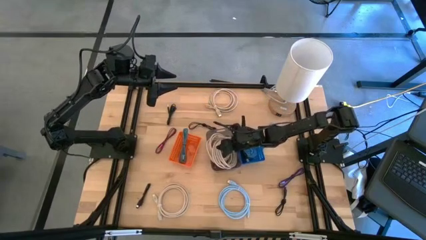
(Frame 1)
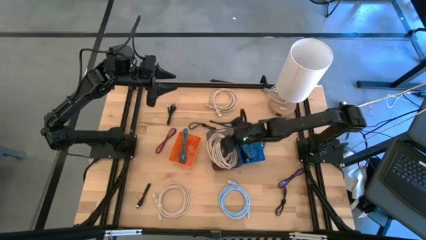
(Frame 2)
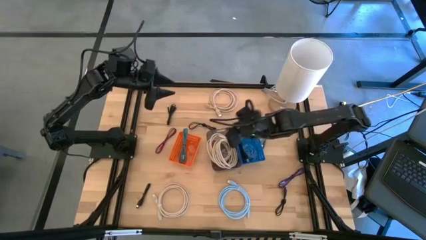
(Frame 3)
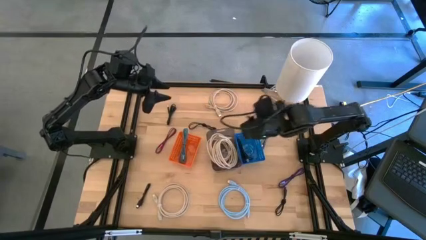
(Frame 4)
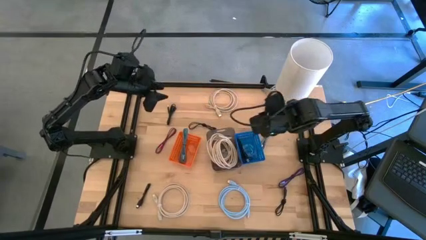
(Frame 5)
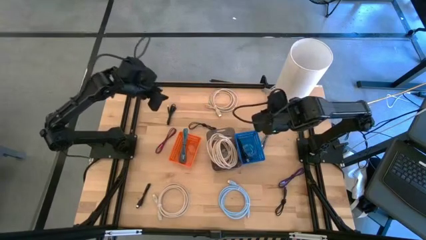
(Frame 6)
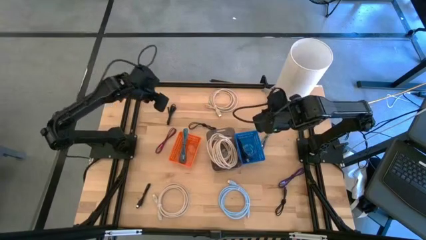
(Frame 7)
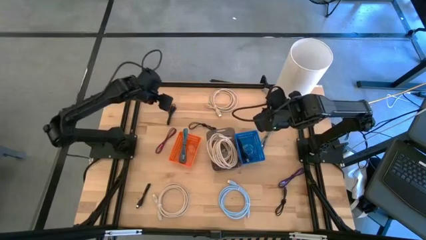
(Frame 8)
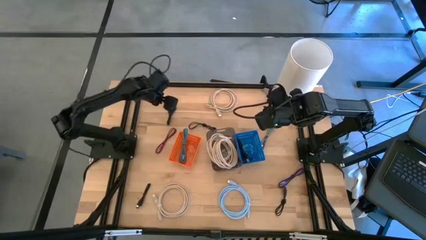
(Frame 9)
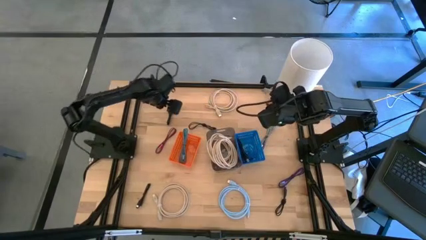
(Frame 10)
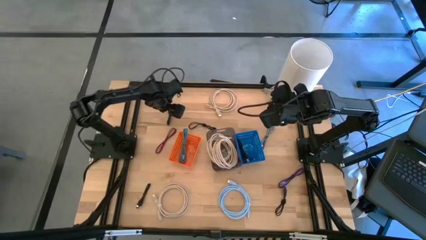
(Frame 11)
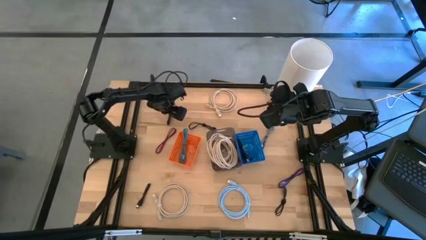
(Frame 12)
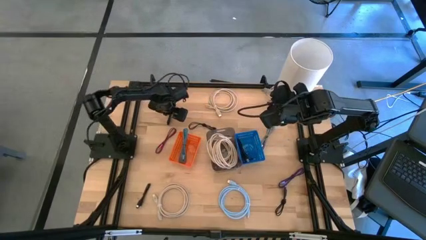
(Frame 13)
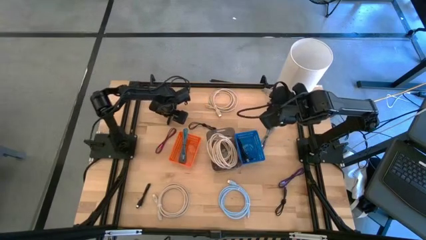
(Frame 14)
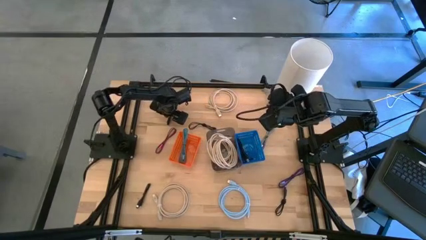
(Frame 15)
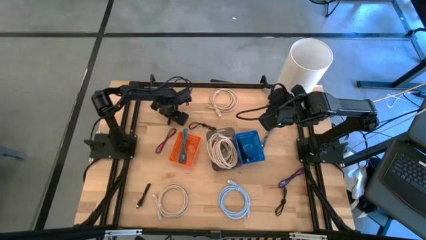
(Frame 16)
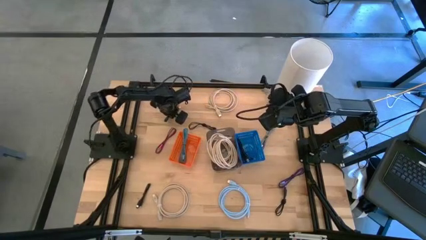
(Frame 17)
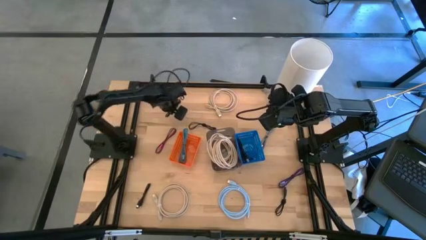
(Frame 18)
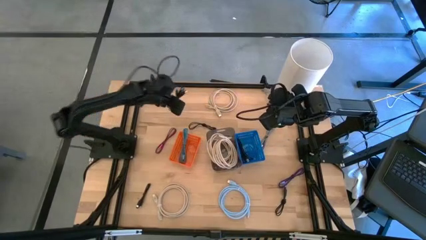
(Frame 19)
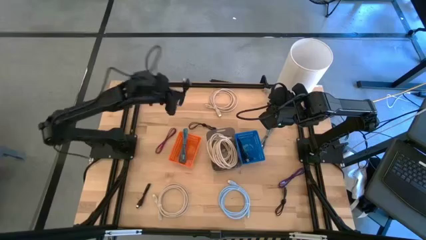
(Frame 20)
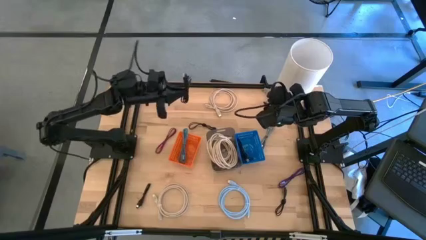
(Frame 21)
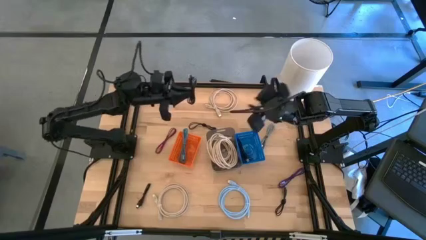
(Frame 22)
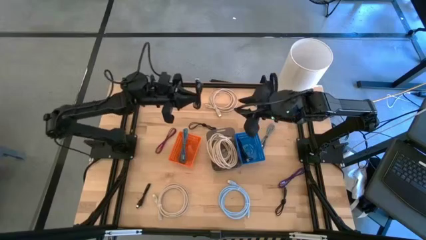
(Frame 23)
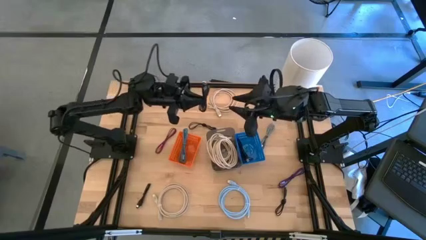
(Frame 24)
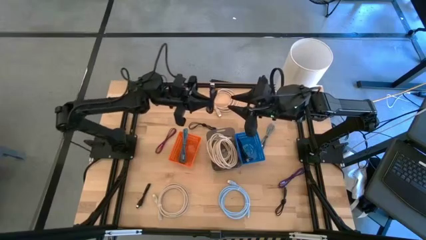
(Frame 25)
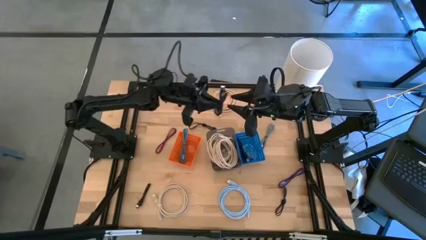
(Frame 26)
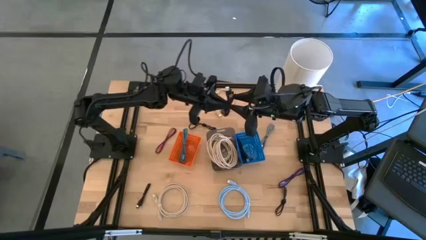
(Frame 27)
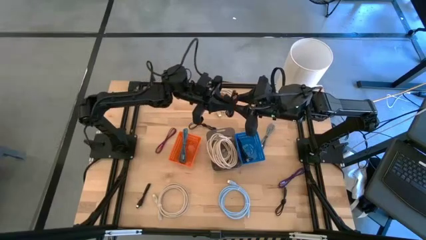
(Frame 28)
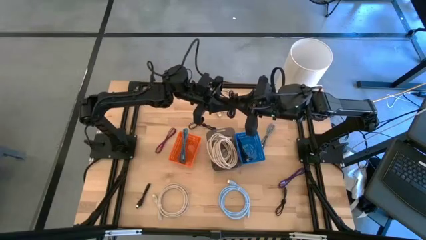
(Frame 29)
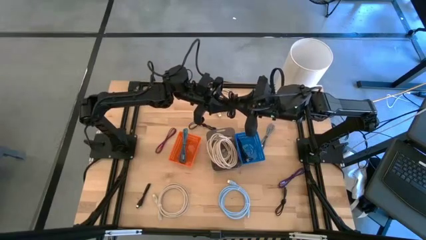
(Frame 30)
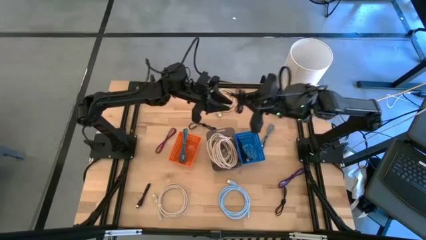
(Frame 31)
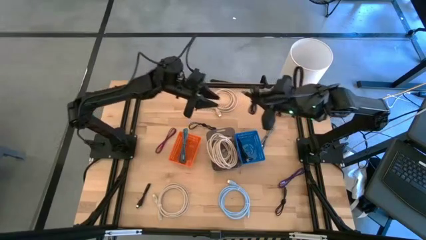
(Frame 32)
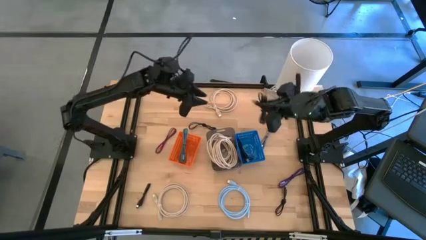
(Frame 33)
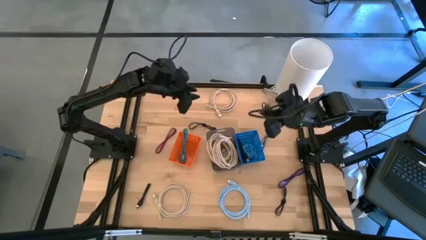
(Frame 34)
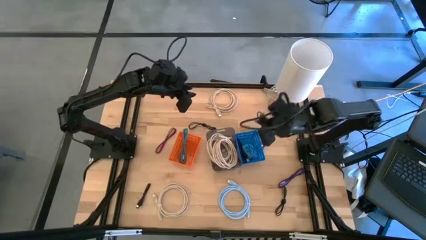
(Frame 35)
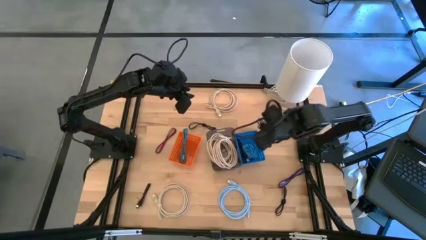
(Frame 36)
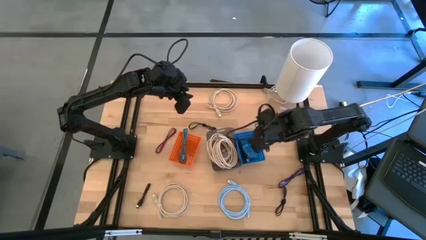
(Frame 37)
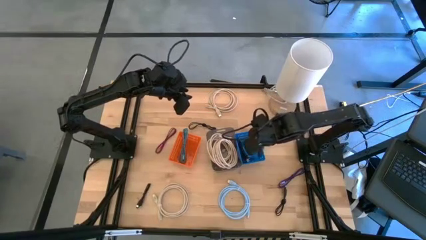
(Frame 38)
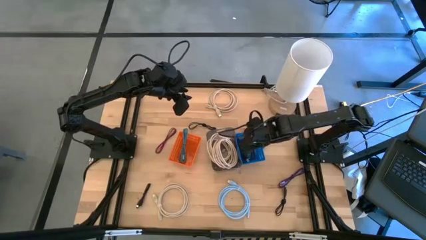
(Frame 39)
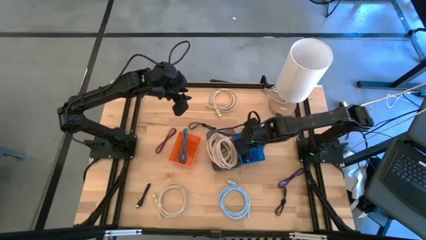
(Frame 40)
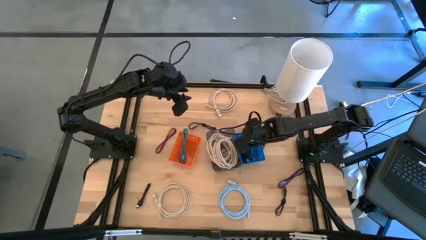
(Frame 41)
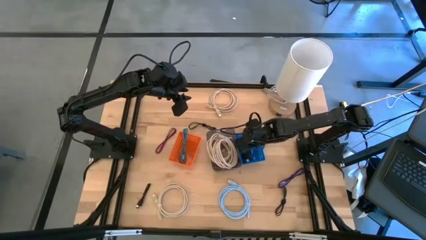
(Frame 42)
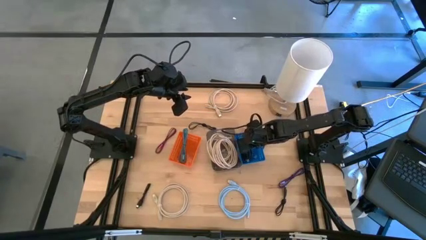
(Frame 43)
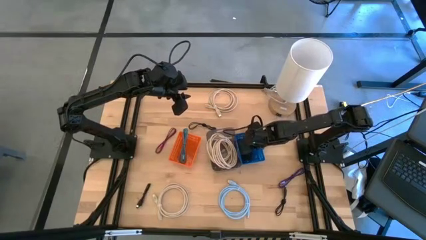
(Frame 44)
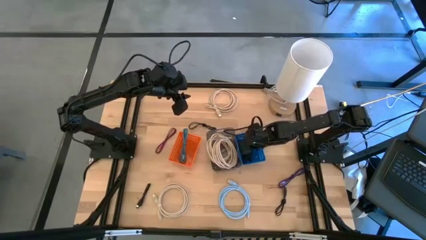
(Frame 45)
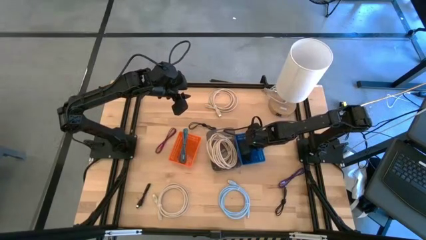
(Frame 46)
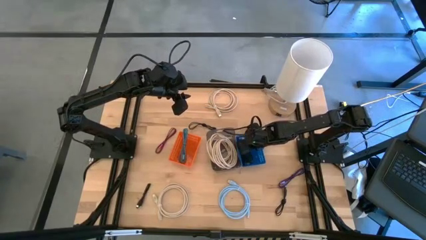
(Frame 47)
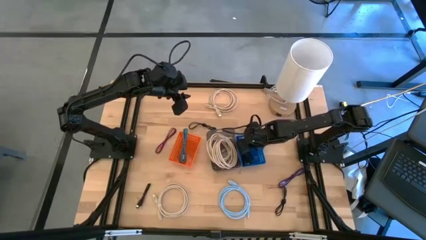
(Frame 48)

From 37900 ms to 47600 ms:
Task: Pick & Place USB Port
Put the black charger cable into the blue bin
